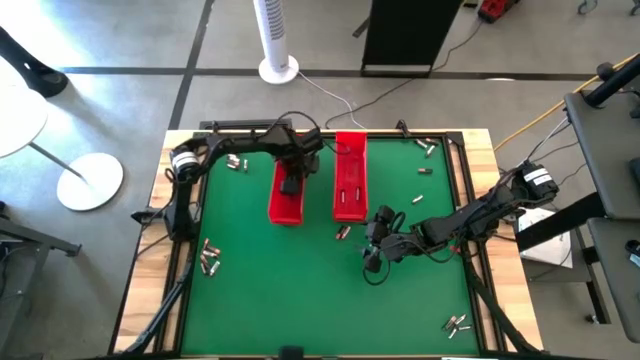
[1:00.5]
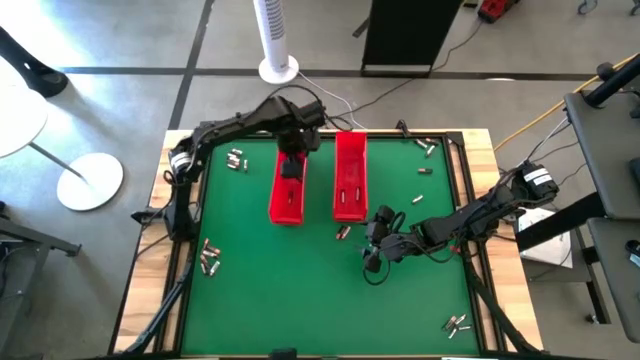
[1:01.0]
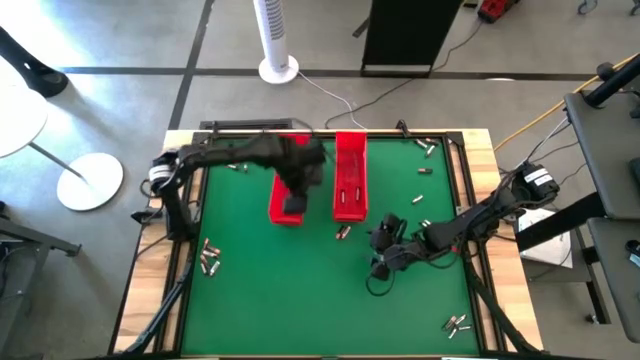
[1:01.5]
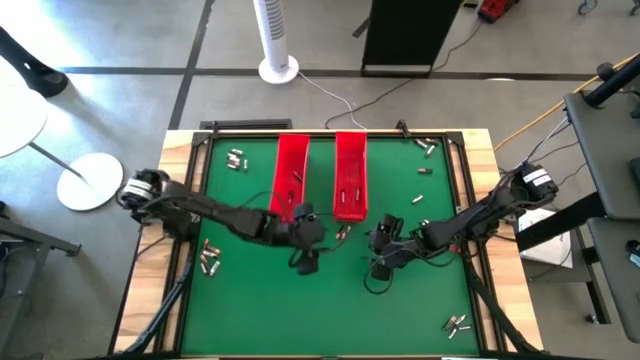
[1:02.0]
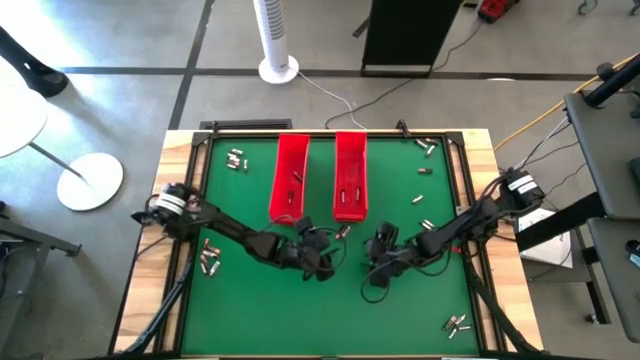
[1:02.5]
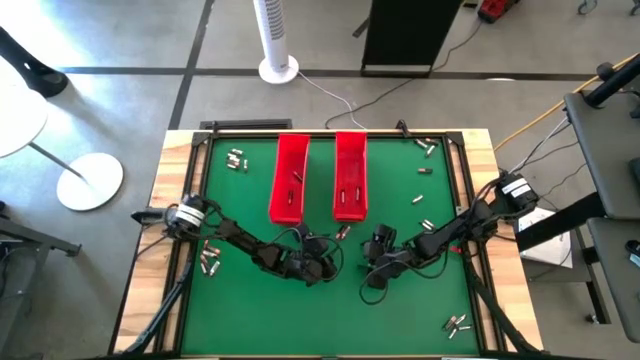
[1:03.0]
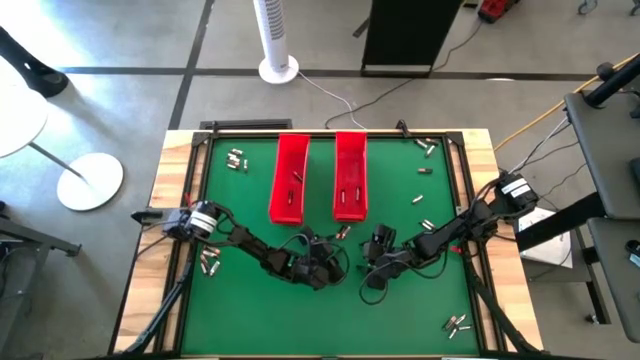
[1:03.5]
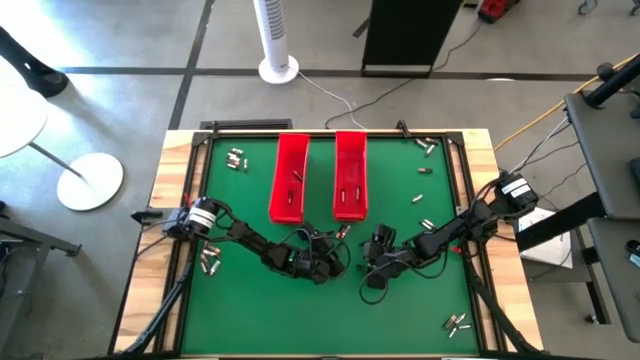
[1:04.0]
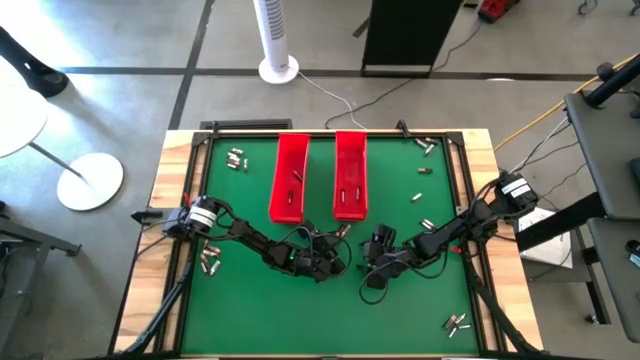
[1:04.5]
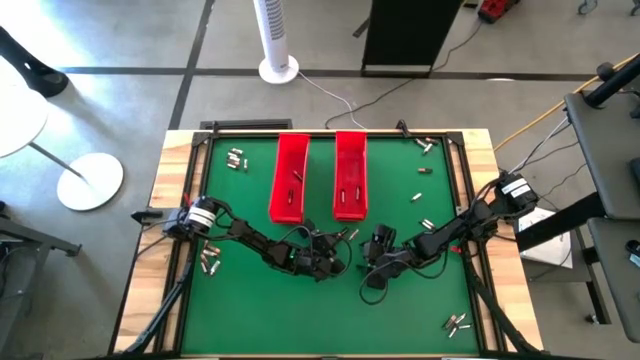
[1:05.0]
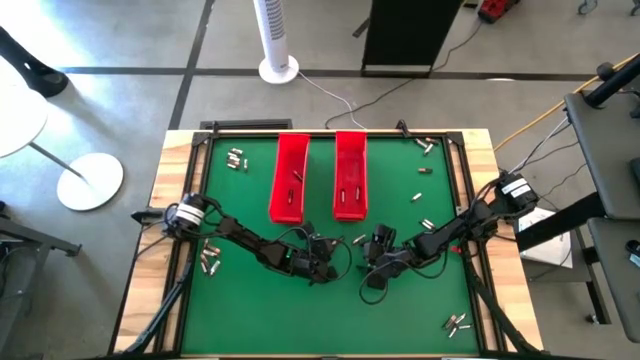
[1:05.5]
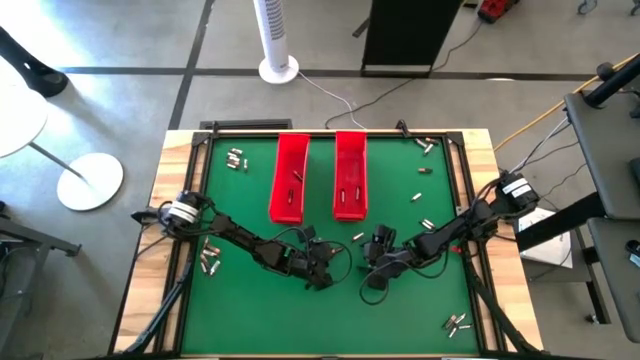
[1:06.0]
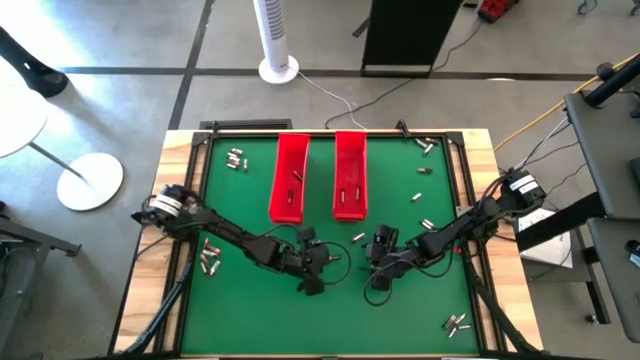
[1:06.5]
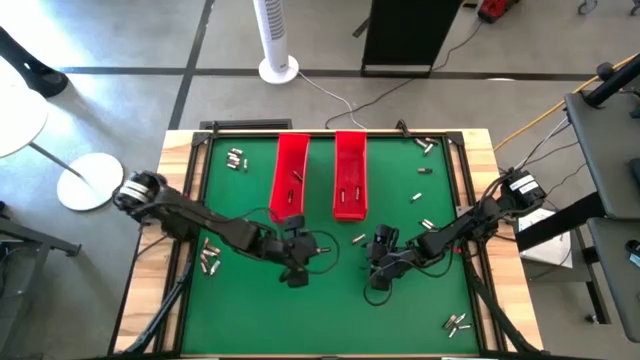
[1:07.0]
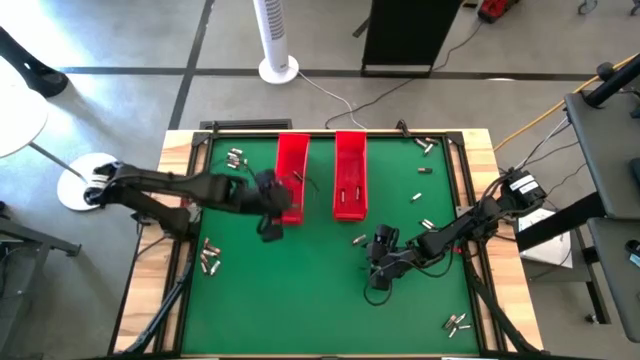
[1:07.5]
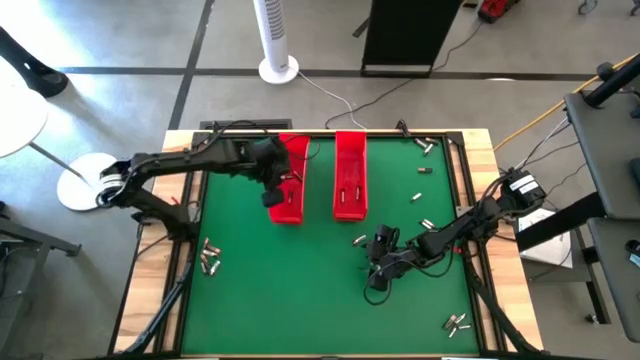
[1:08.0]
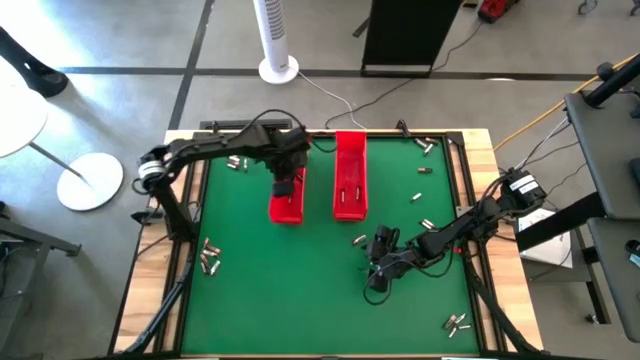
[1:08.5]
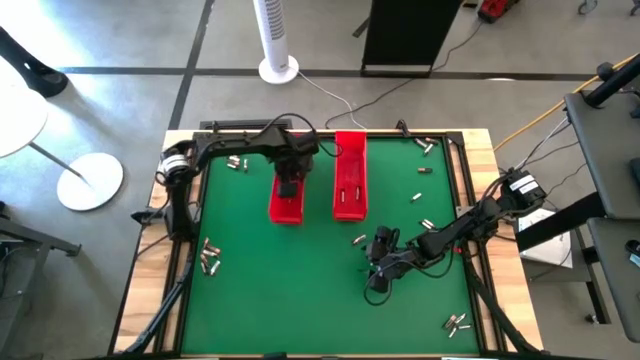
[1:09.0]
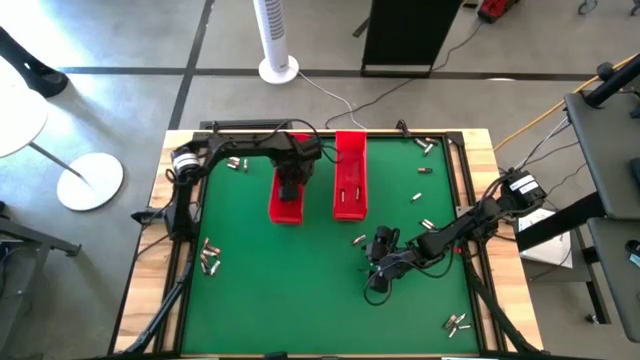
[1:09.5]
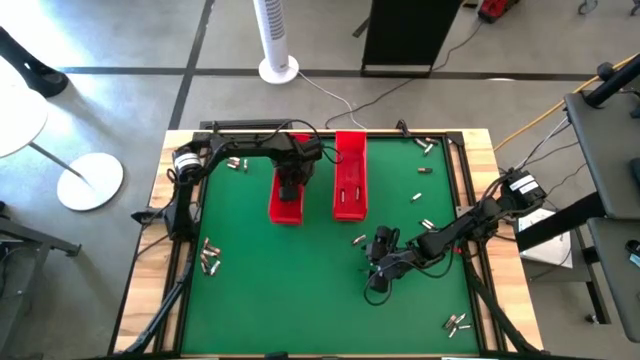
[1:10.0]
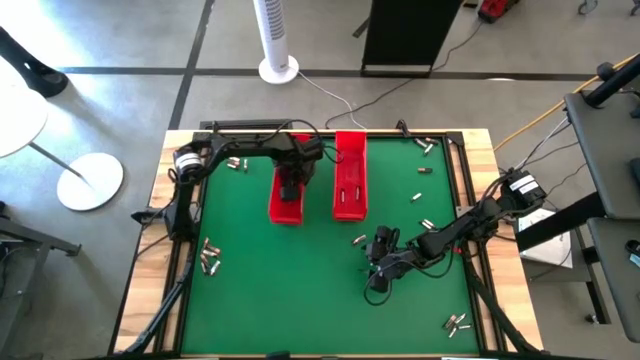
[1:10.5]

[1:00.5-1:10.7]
Task: Sort batteries
Put the black battery into the left red bin

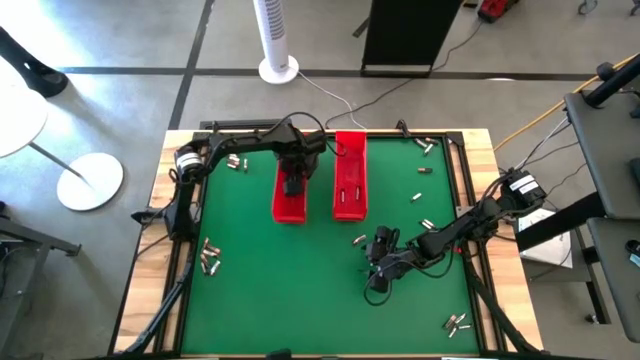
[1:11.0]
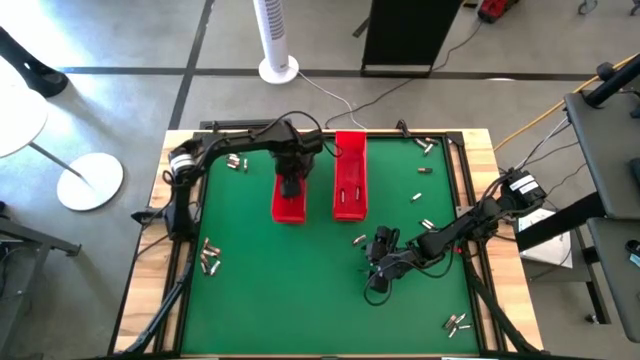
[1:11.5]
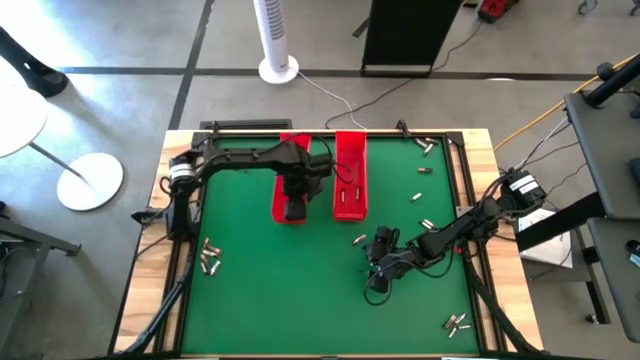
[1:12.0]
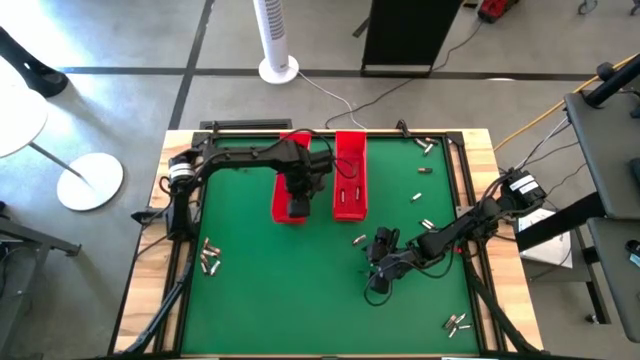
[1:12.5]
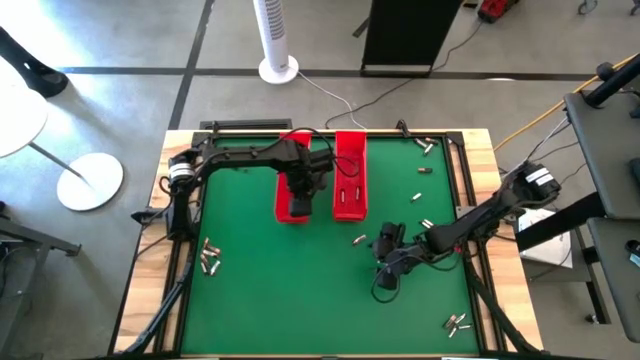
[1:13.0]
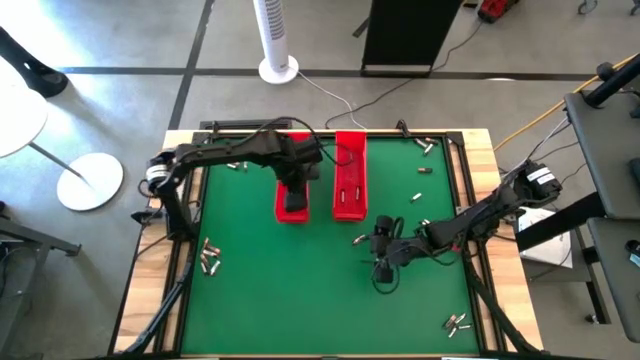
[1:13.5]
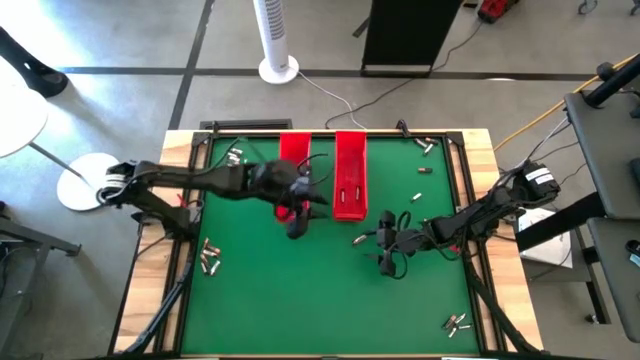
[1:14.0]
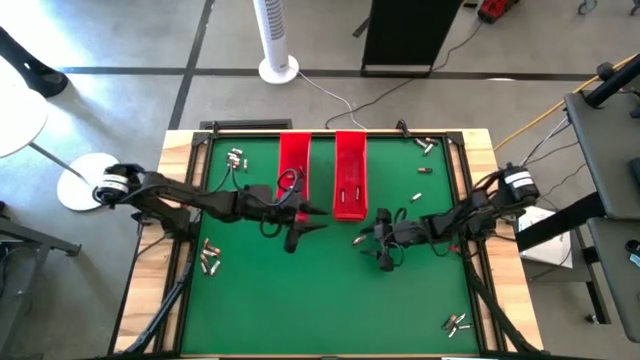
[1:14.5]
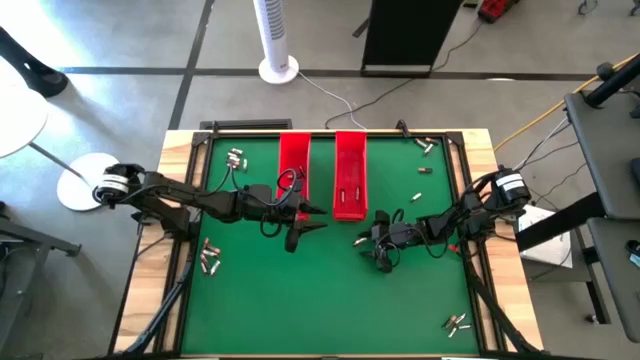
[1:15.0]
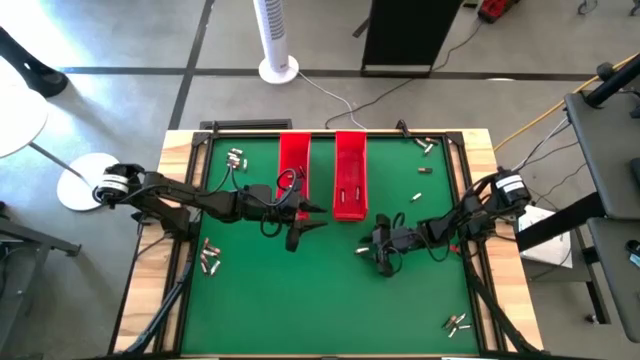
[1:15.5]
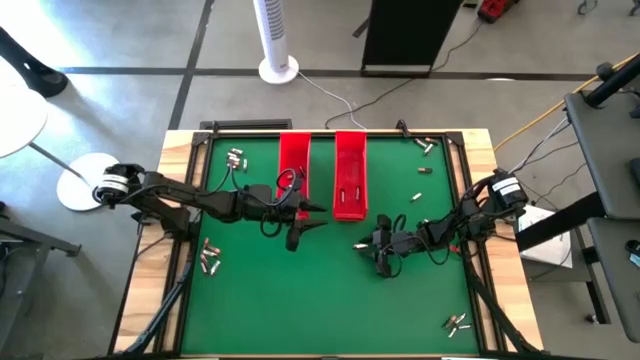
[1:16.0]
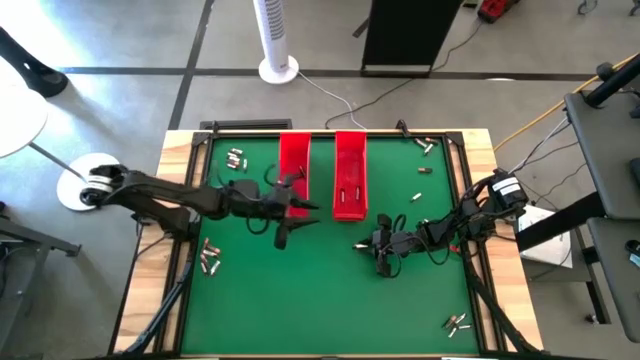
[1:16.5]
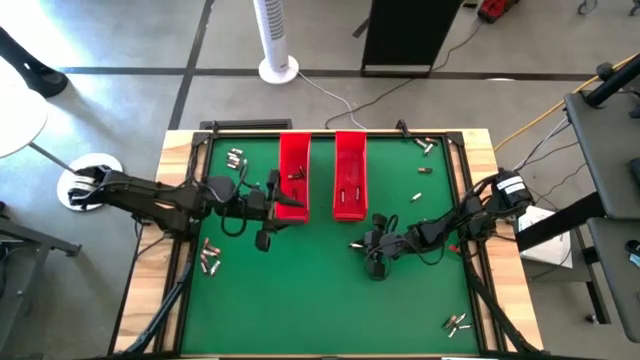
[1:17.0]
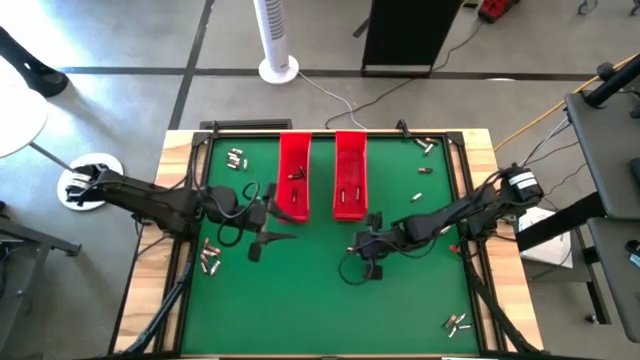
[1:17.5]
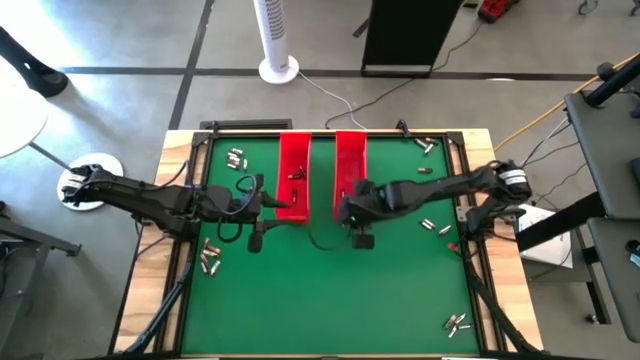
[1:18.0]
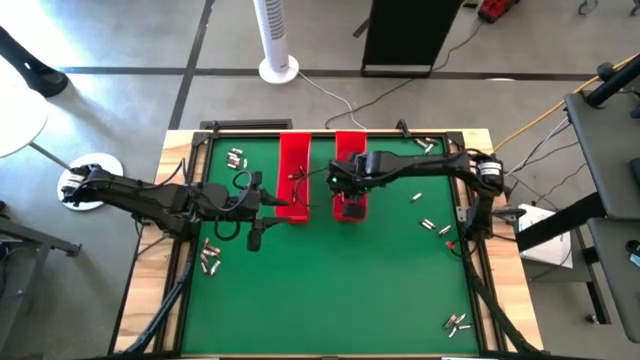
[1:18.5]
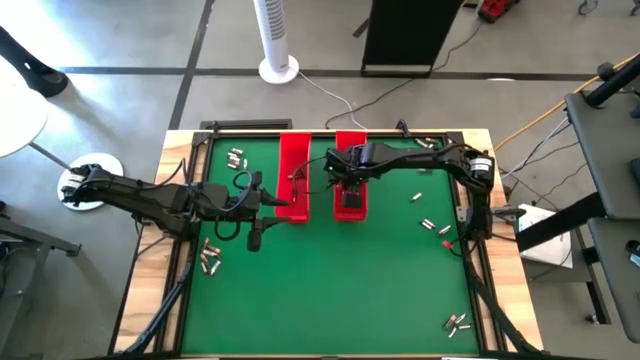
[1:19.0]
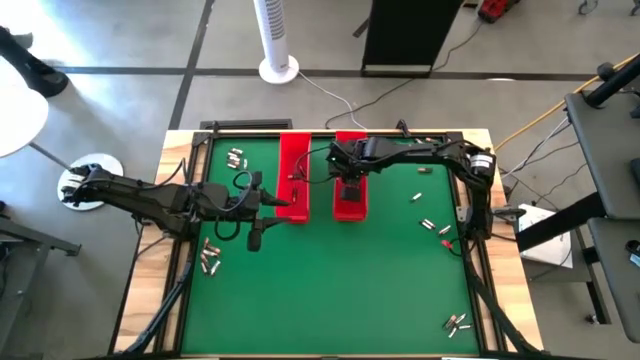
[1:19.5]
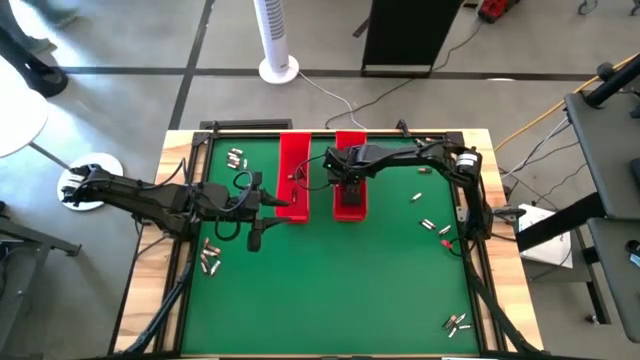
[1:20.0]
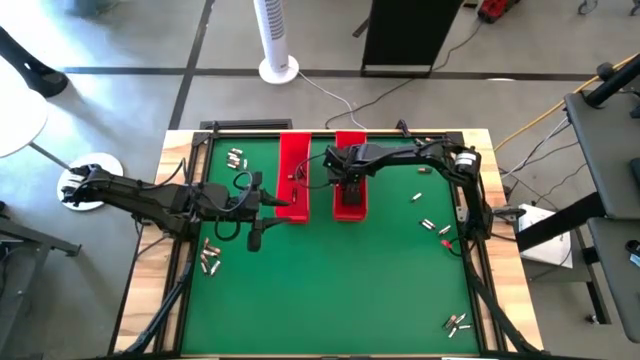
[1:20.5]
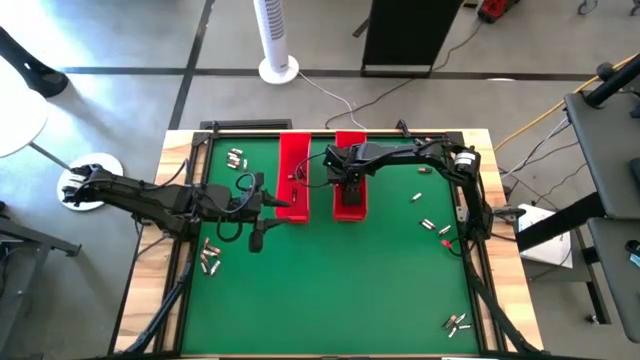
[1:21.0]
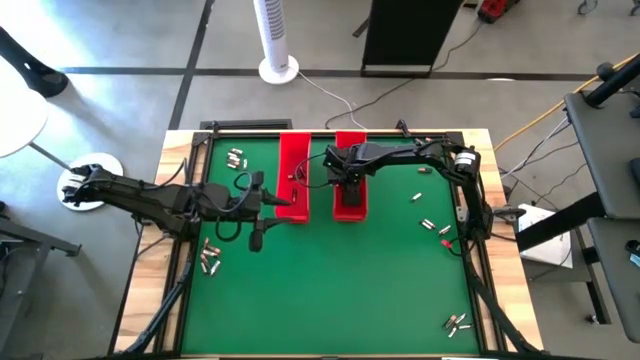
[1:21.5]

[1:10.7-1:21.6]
Put the silver battery into the right red bin
